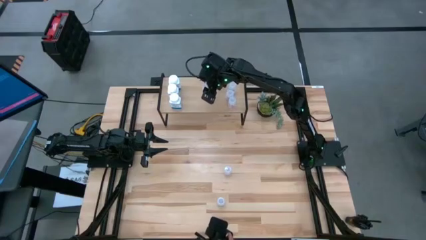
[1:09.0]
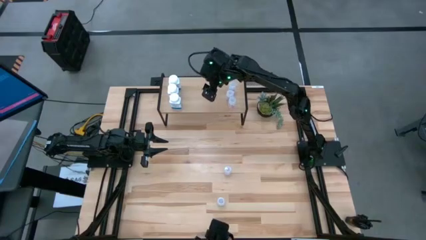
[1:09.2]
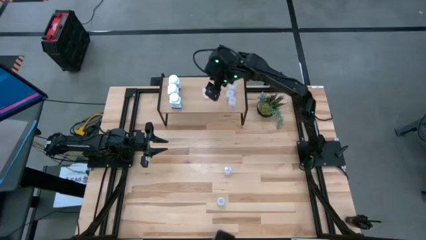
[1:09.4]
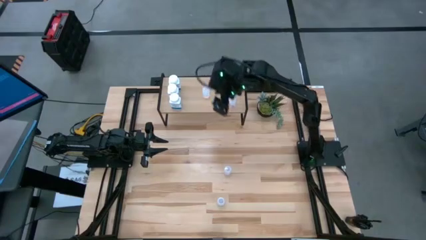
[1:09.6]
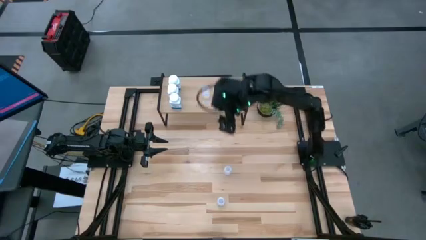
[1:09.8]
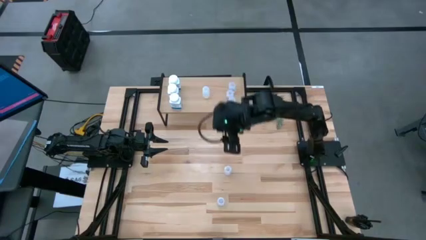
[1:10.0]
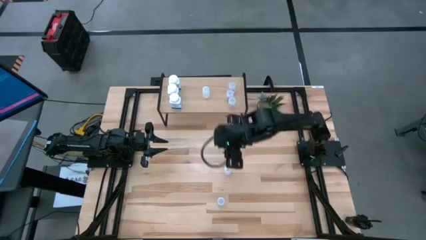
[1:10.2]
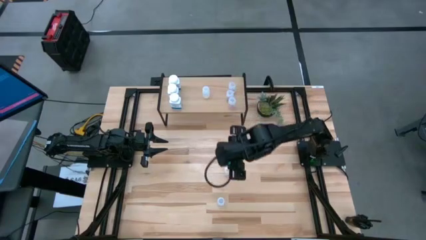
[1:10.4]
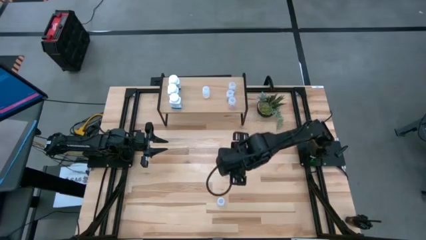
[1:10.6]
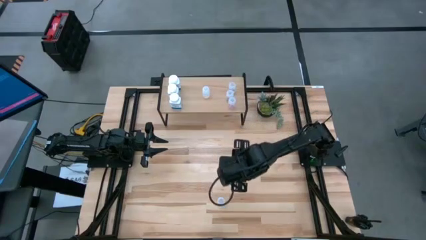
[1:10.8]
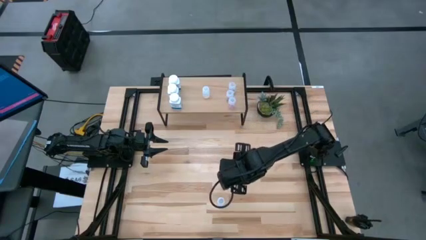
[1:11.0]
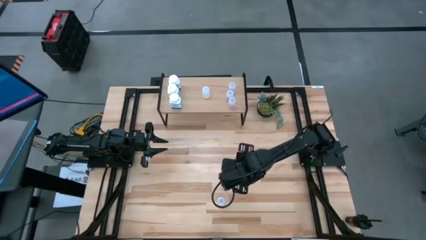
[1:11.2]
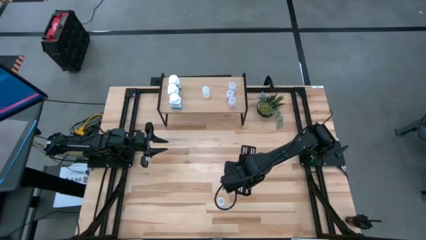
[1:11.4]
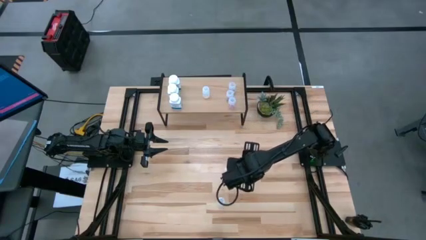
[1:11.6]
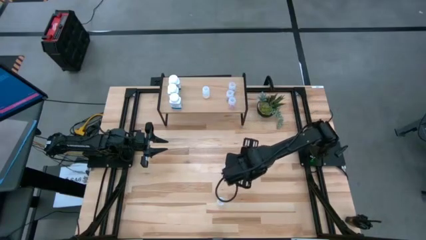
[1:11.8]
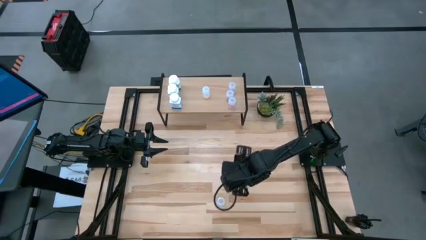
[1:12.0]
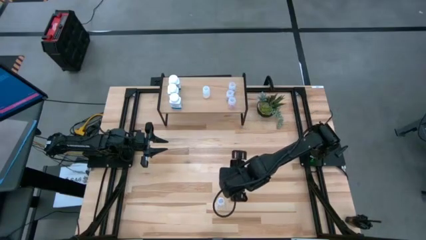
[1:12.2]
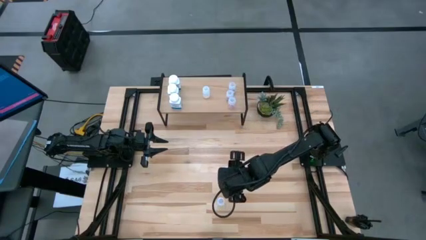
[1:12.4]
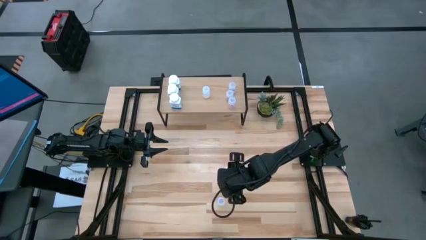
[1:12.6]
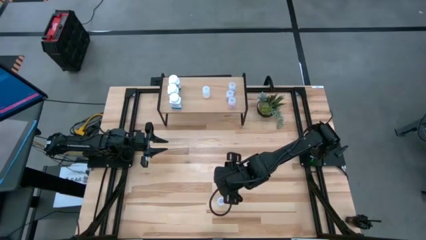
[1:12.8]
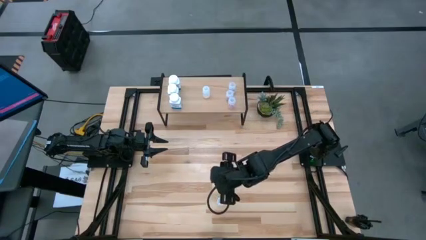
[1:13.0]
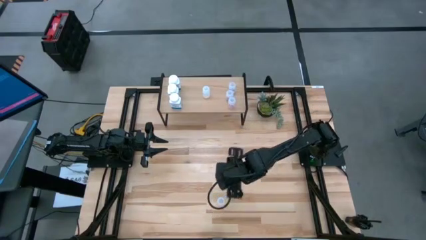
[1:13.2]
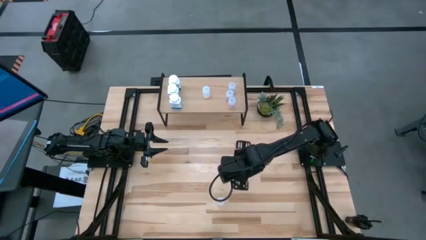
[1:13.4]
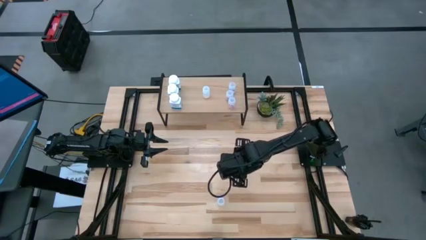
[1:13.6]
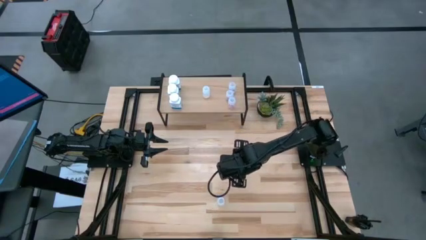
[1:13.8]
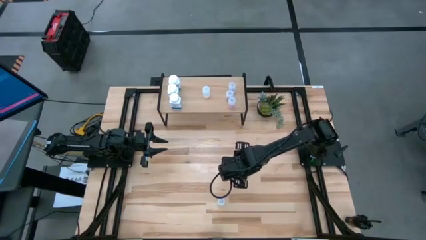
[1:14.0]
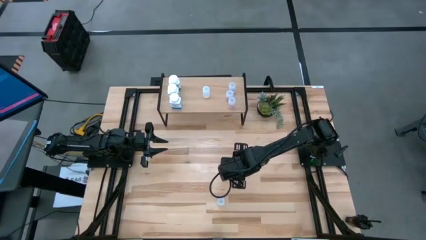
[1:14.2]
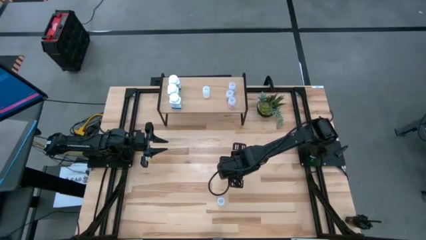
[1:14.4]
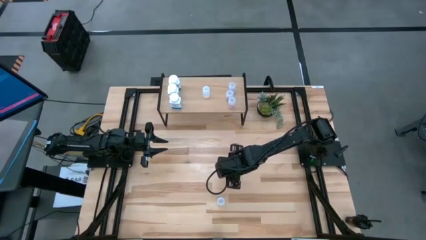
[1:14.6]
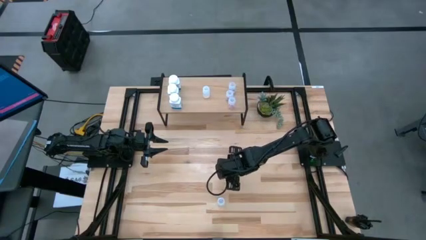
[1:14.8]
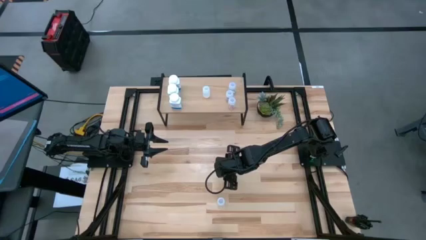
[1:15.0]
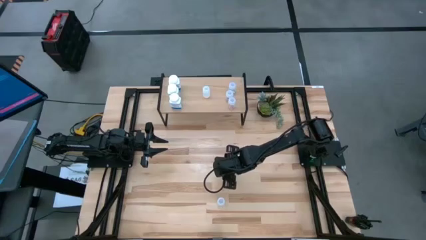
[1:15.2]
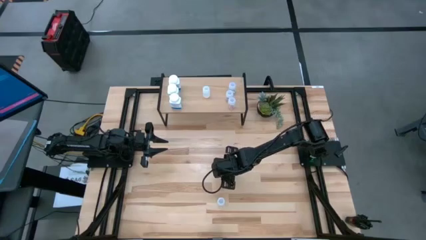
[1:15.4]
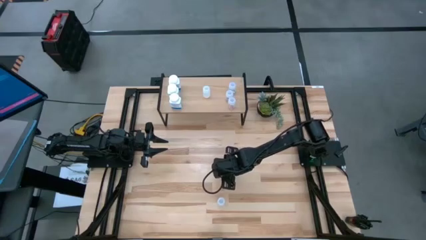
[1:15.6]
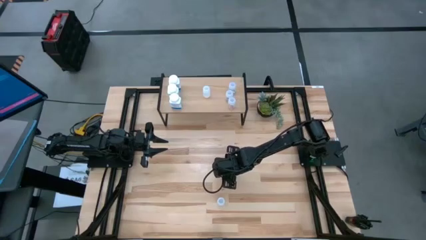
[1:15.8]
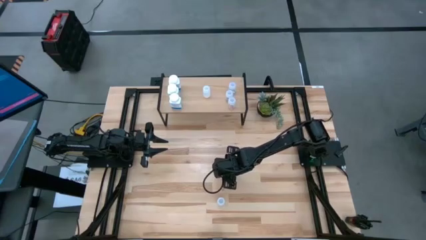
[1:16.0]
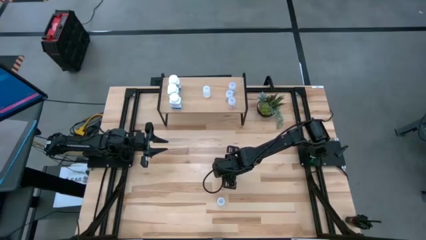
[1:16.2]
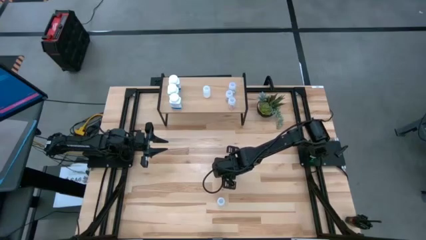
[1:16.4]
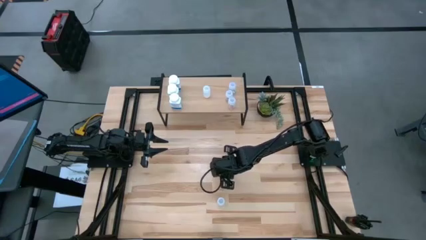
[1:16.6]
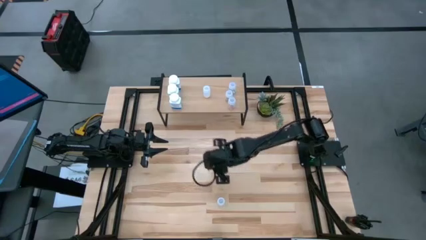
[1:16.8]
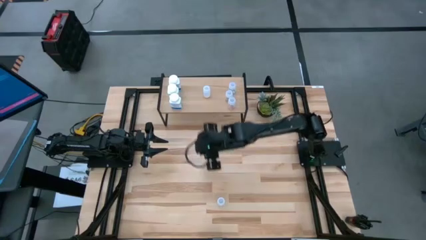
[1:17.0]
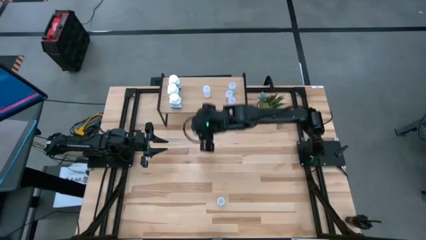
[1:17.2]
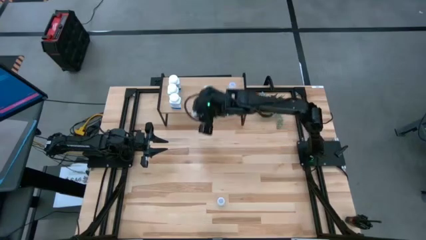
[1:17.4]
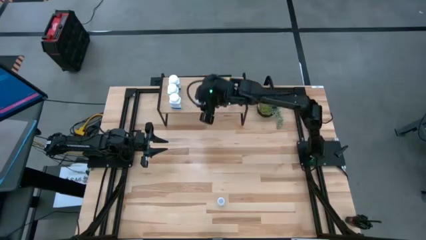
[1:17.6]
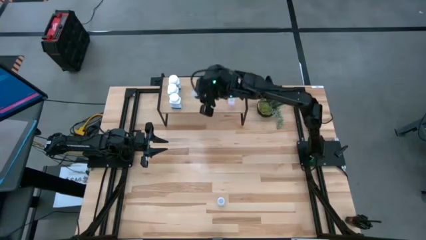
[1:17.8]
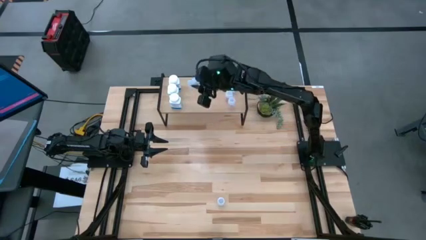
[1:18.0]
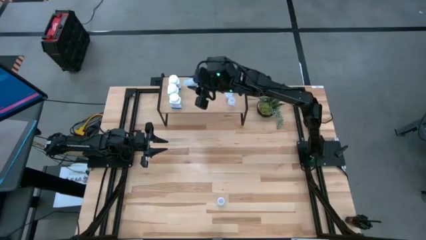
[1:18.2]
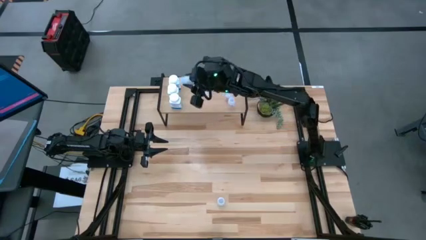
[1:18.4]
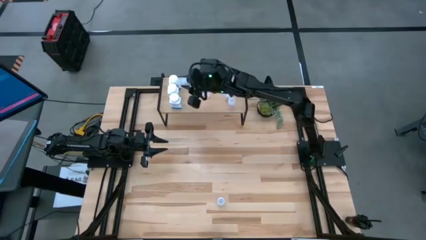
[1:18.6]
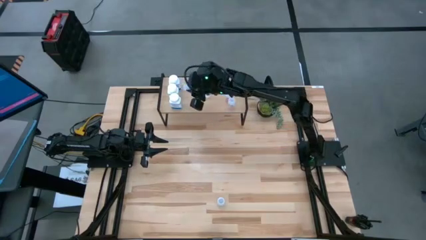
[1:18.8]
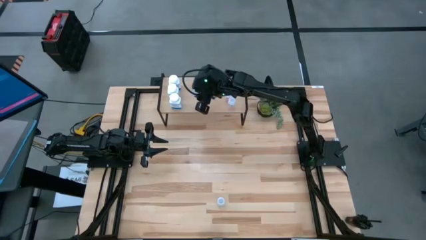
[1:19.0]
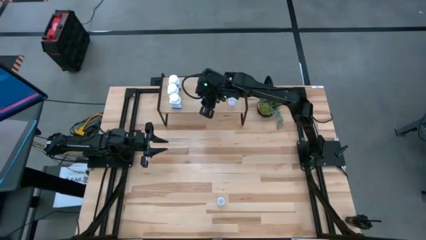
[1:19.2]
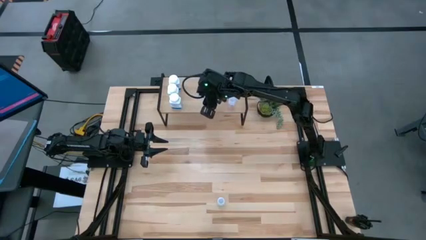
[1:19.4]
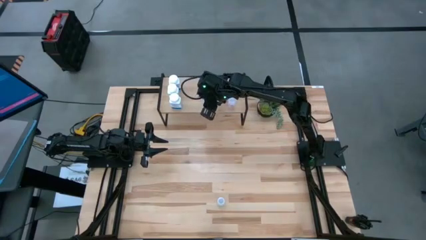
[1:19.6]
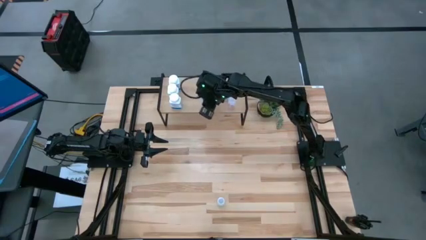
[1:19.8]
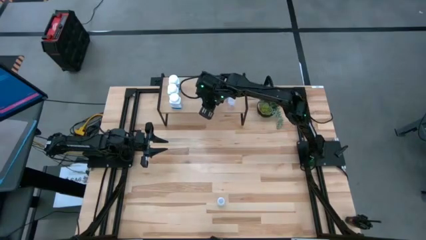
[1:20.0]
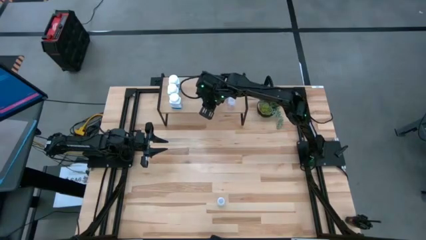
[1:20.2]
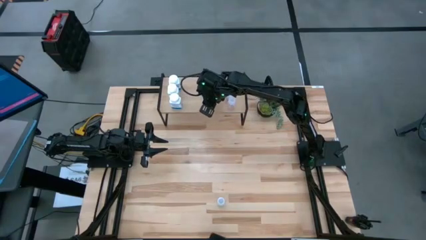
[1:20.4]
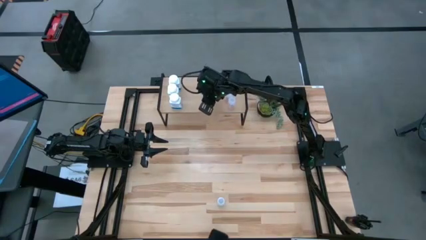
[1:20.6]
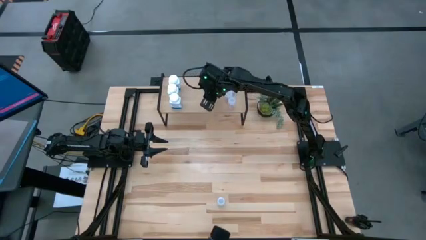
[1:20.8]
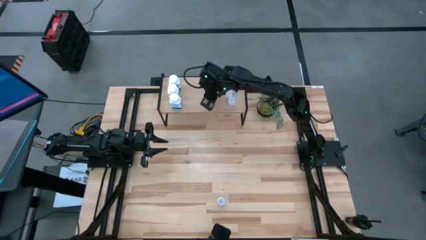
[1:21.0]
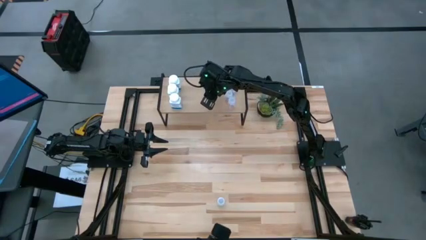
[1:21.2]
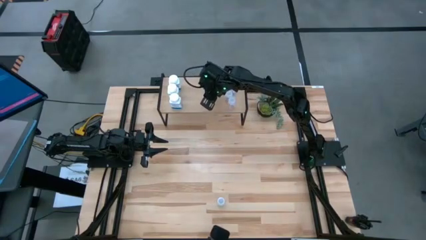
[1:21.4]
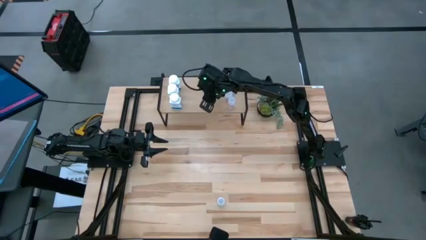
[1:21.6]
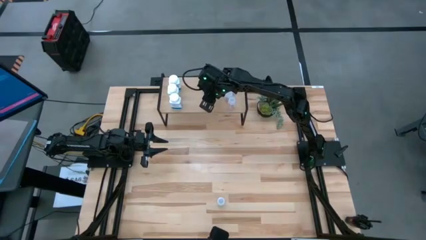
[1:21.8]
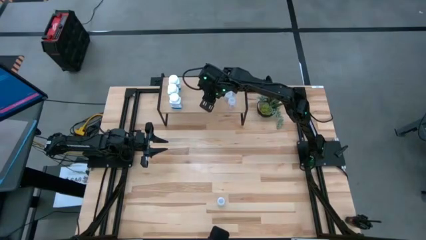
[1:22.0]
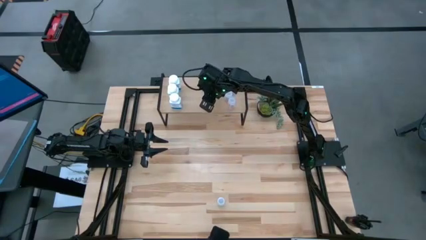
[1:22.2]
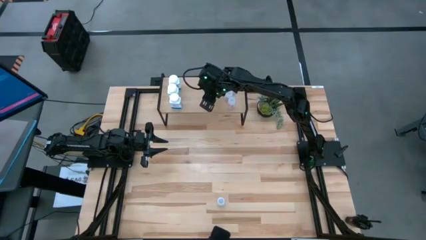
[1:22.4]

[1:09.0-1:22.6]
Task: Pick and place medicine bottles onto shelf by color
Put the transparent pill bottle on the shelf aligned with the other transparent pill bottle

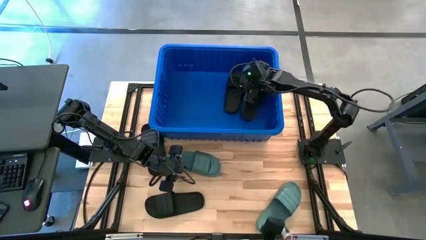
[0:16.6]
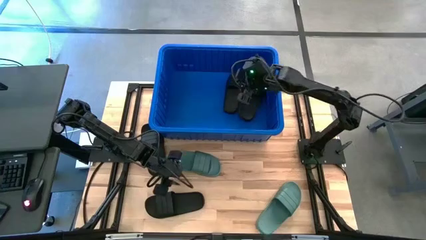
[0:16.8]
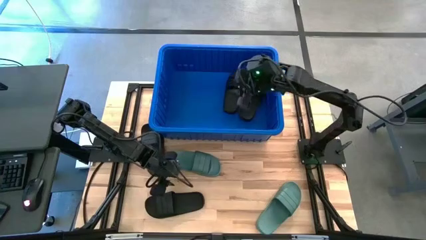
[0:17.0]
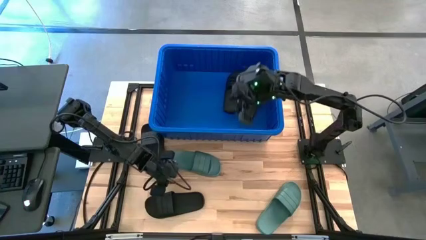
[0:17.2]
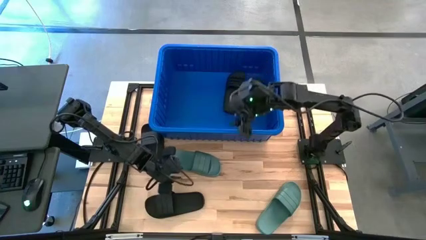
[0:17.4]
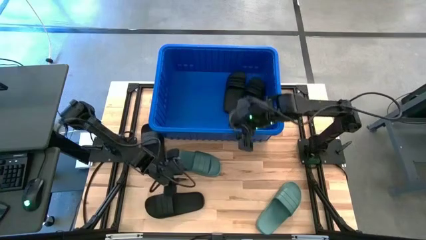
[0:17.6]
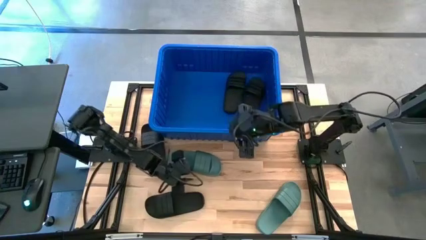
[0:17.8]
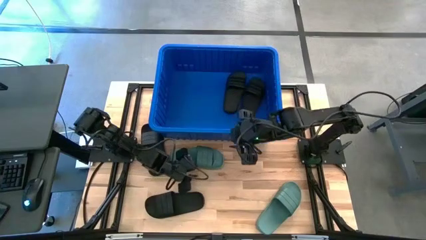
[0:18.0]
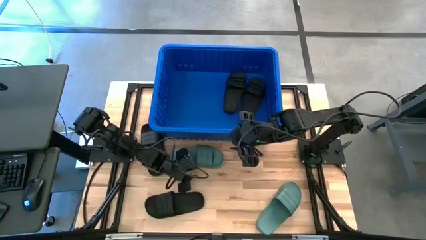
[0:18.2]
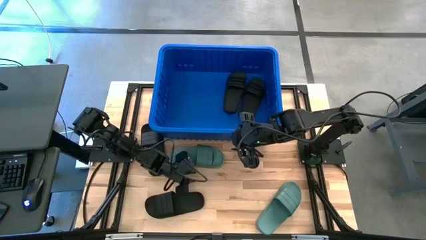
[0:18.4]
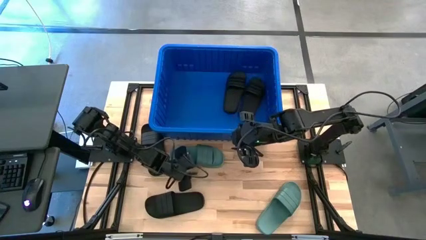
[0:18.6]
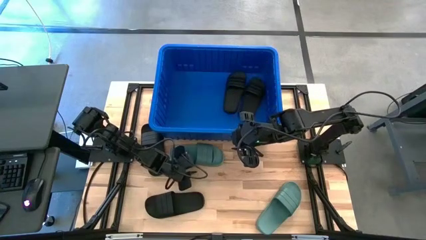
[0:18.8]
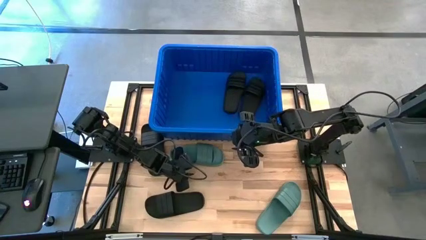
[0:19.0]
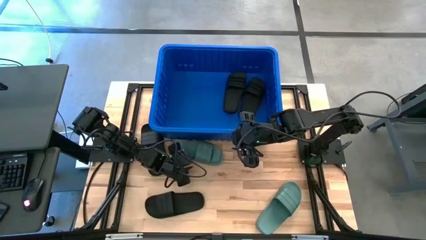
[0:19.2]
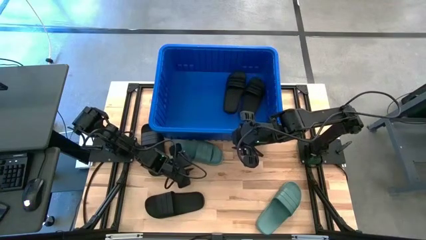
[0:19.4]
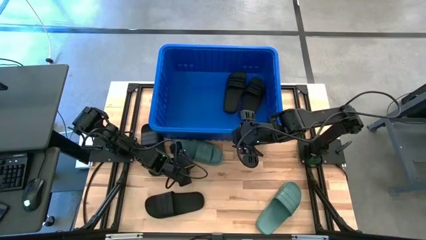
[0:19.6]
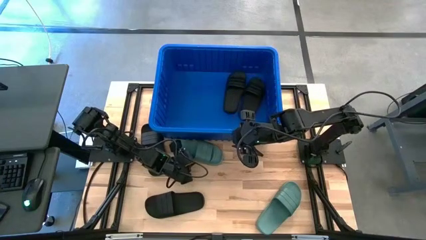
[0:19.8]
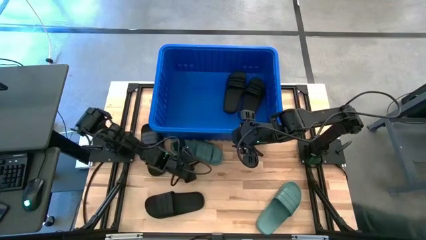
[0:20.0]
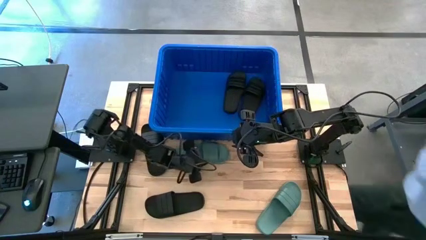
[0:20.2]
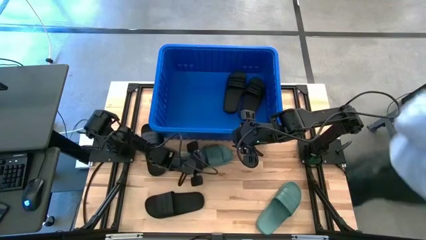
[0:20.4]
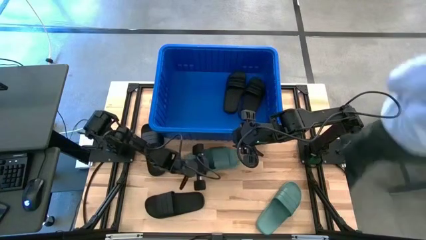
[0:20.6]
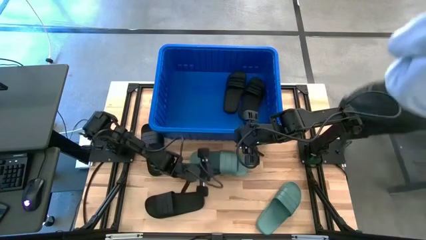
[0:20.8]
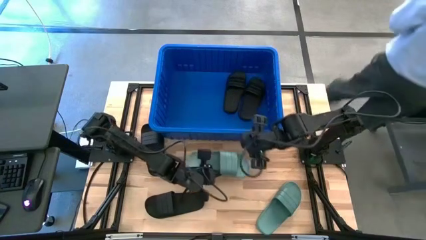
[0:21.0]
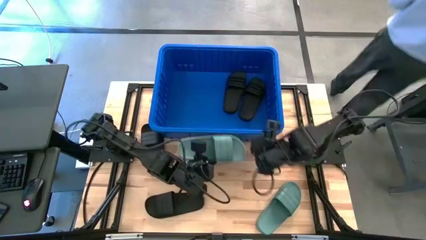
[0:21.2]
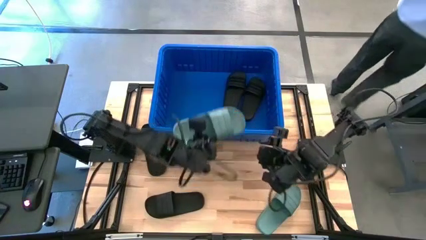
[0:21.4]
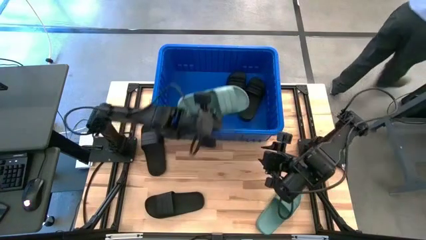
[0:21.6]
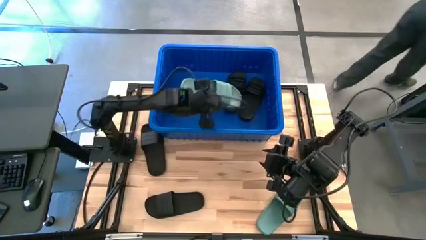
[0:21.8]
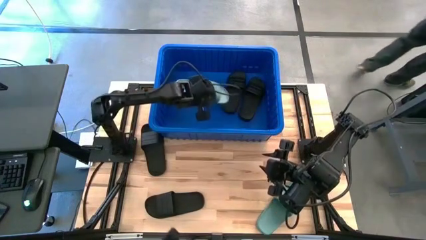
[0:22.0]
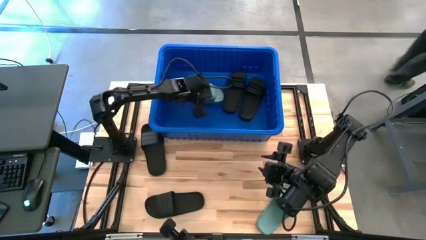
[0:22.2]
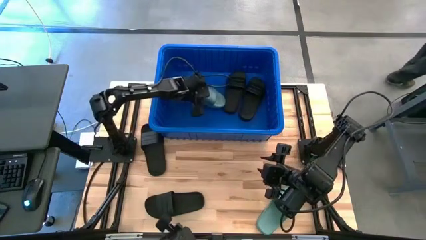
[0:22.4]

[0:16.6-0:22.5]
Task: Pick and place slides into bin
Put the green slipper into the blue bin
